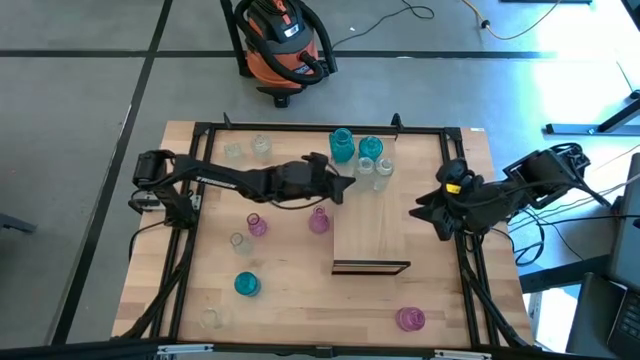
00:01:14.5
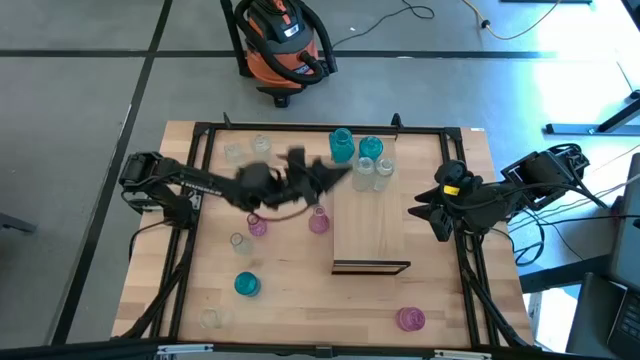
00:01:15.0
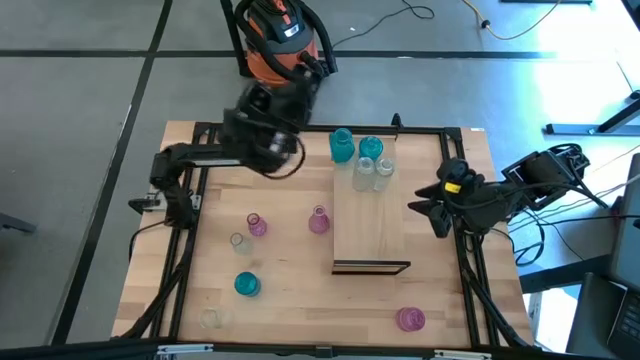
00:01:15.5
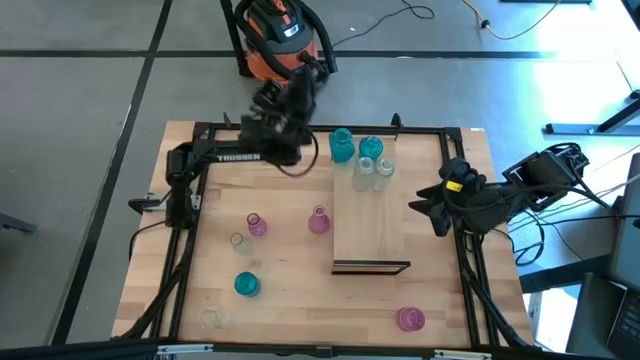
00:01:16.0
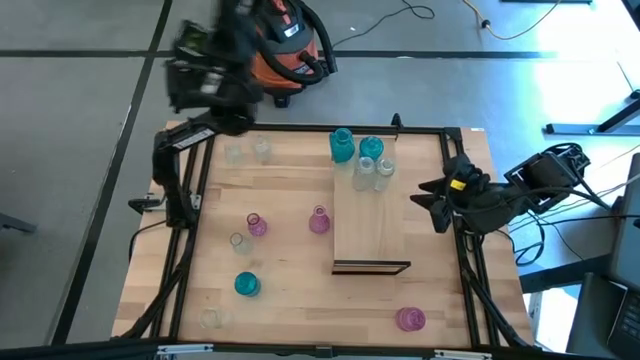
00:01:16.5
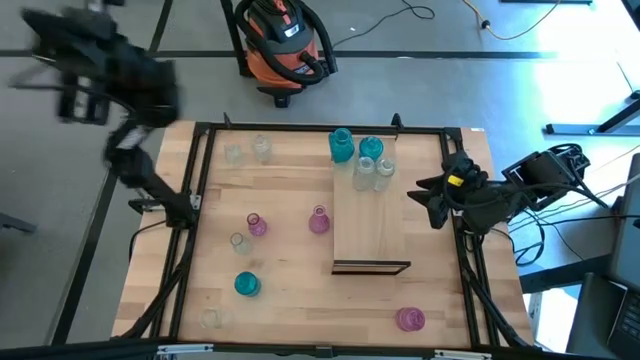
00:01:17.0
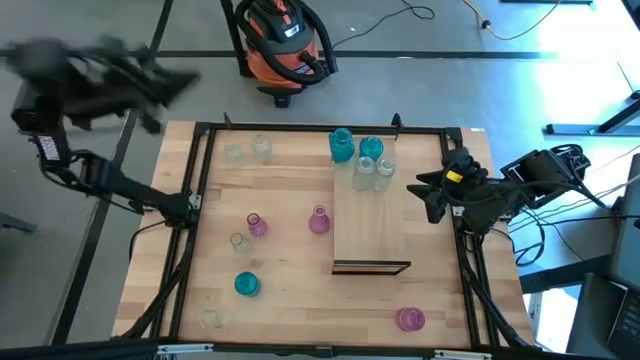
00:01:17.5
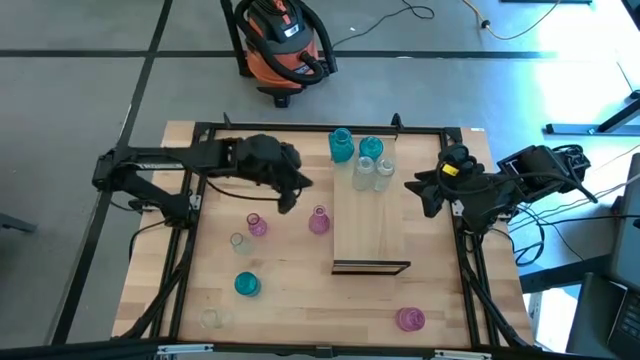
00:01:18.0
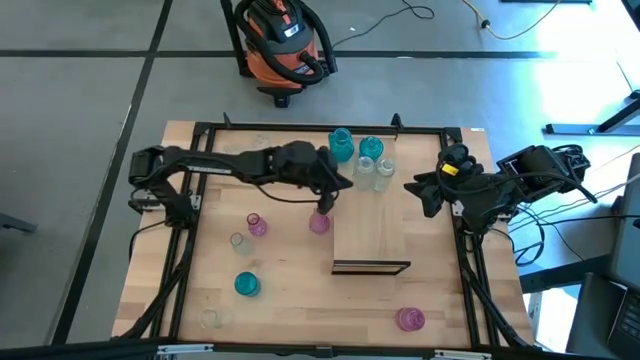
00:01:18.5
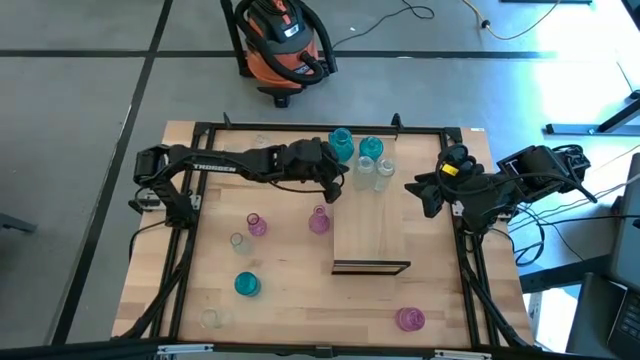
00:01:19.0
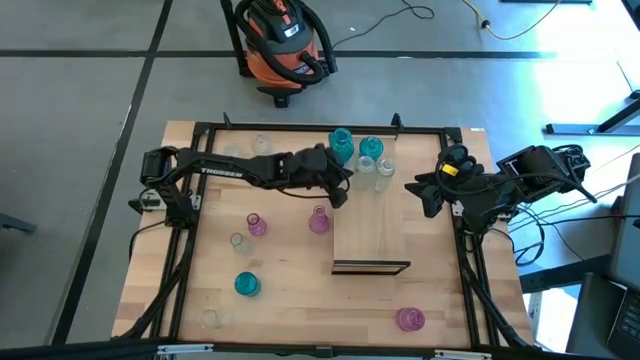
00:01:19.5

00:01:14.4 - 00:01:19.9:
Task: sort vases onto shelf
Adjust the transparent vase on the shelf

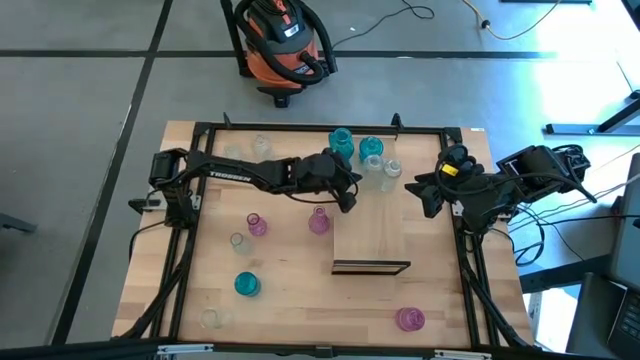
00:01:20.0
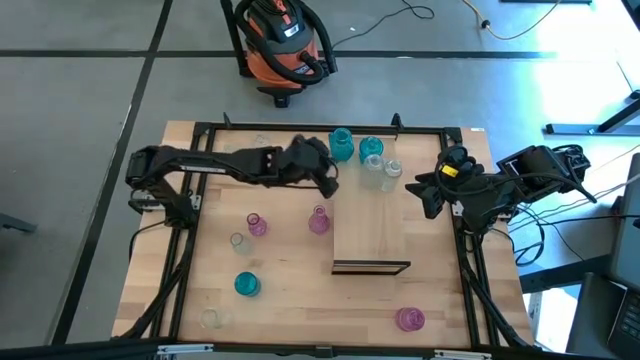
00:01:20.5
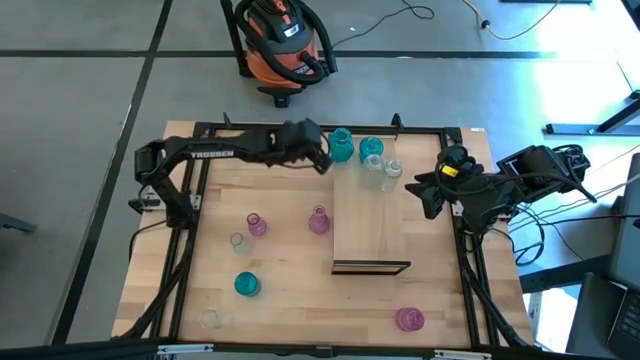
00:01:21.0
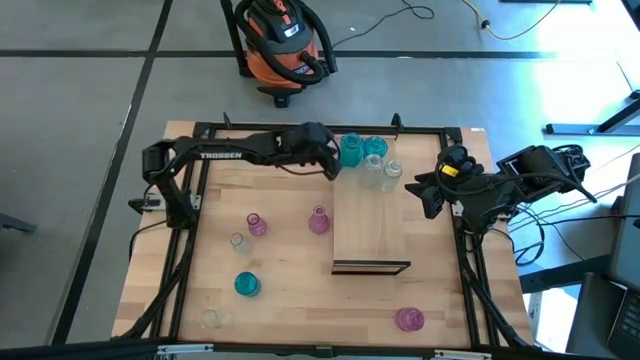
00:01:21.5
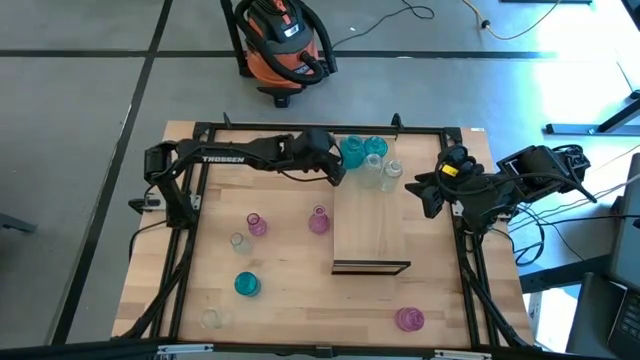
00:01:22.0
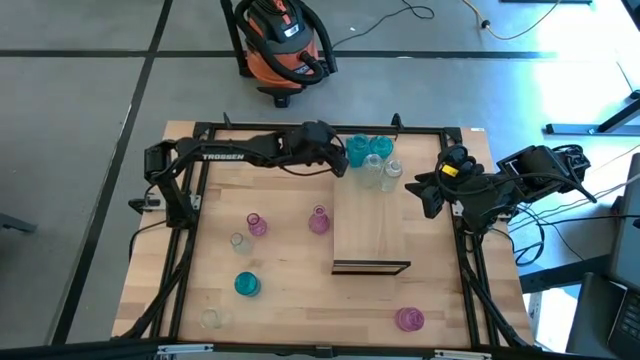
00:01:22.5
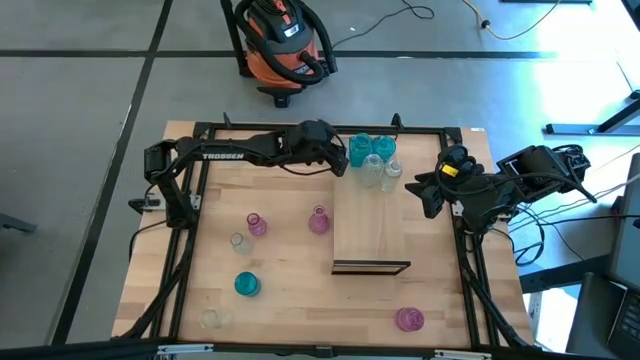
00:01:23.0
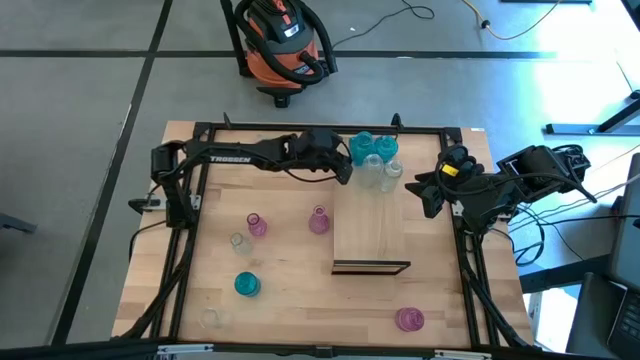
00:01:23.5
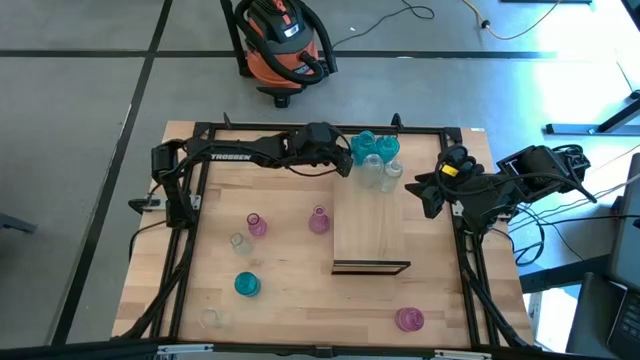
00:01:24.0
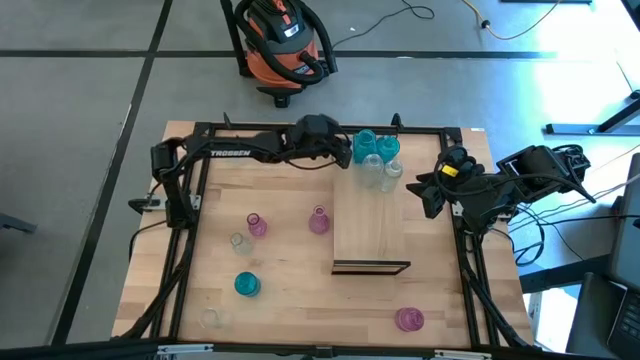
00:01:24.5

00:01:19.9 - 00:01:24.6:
Adjust the blue vase on the shelf

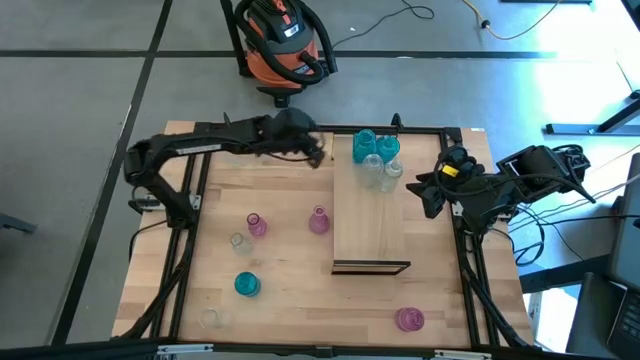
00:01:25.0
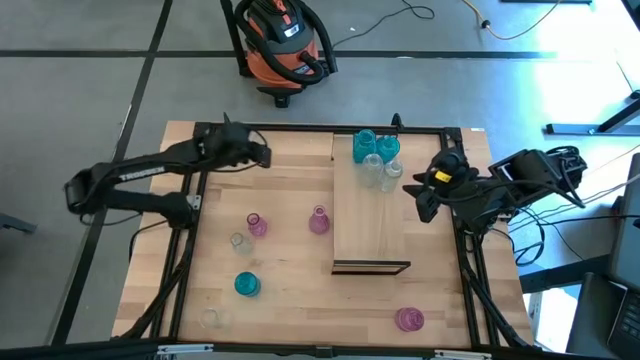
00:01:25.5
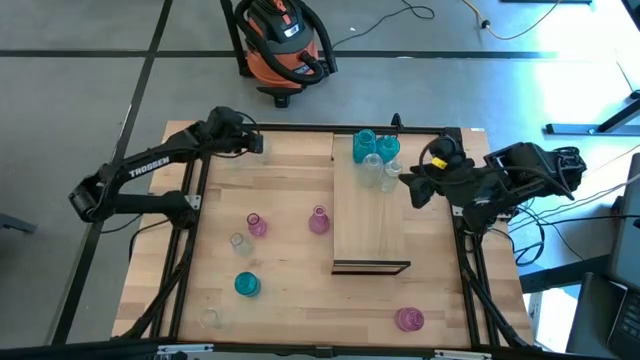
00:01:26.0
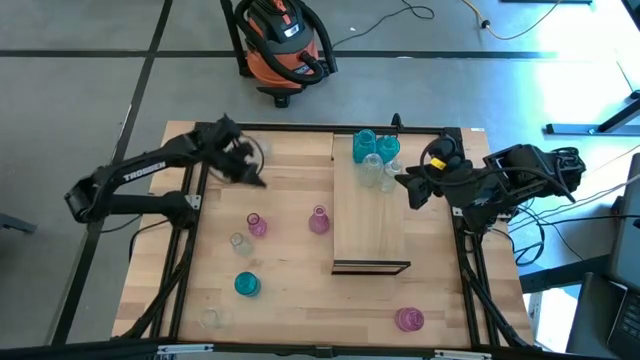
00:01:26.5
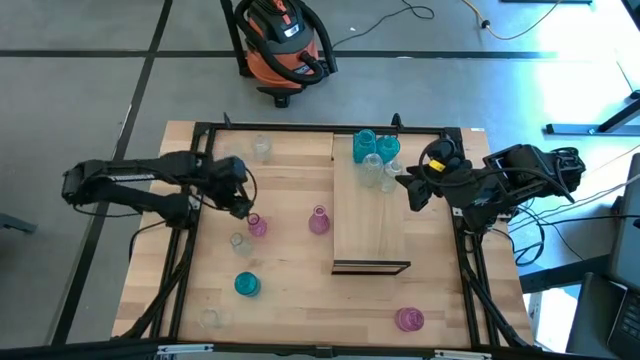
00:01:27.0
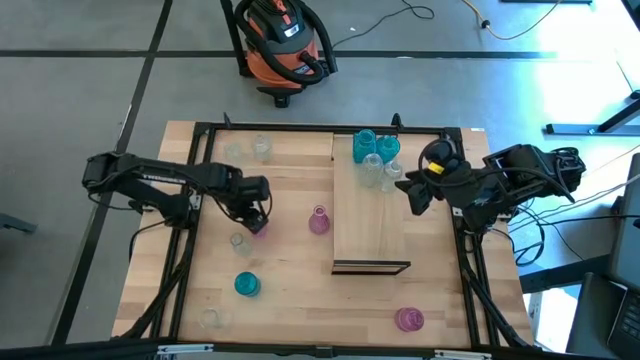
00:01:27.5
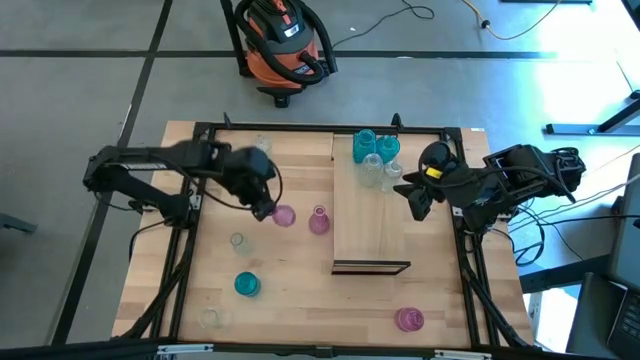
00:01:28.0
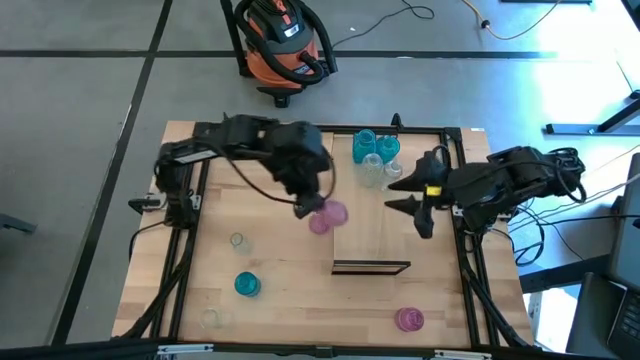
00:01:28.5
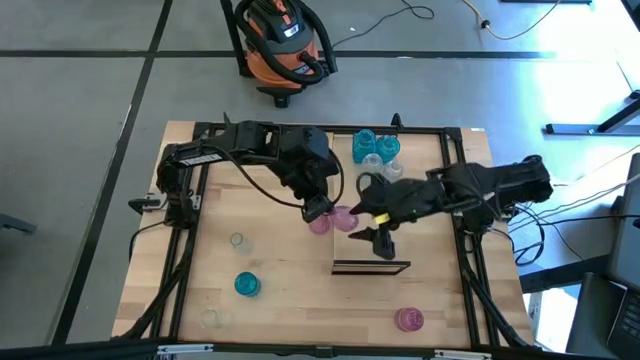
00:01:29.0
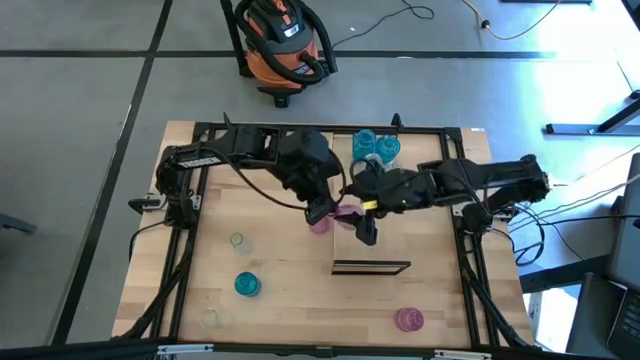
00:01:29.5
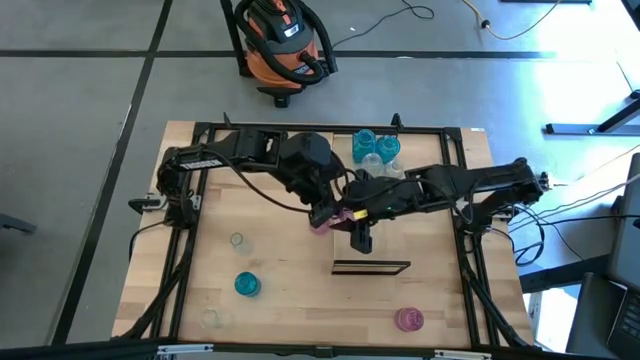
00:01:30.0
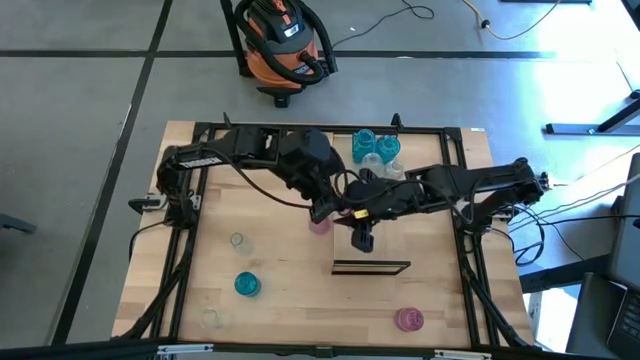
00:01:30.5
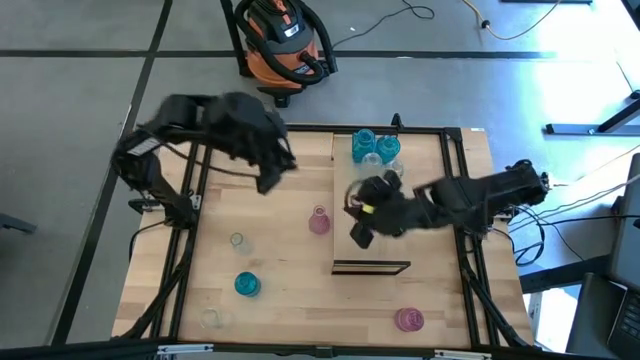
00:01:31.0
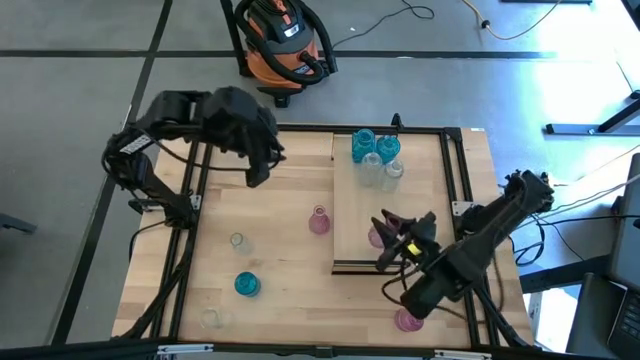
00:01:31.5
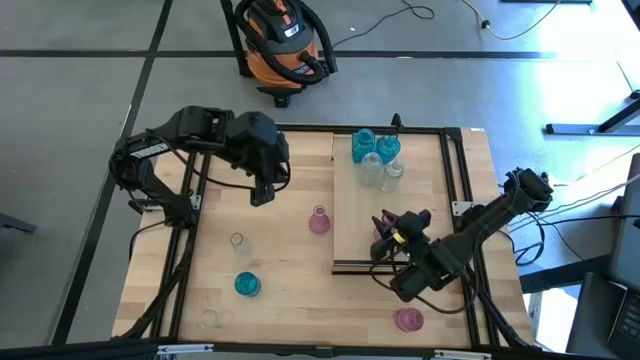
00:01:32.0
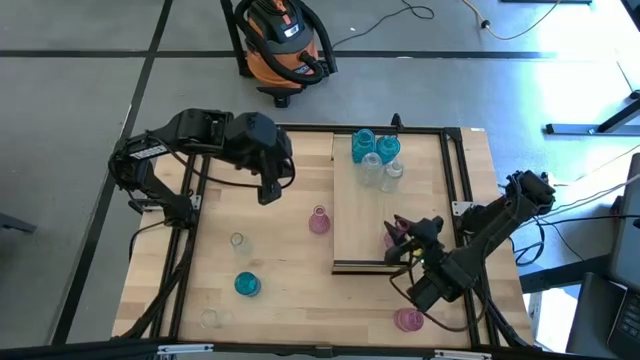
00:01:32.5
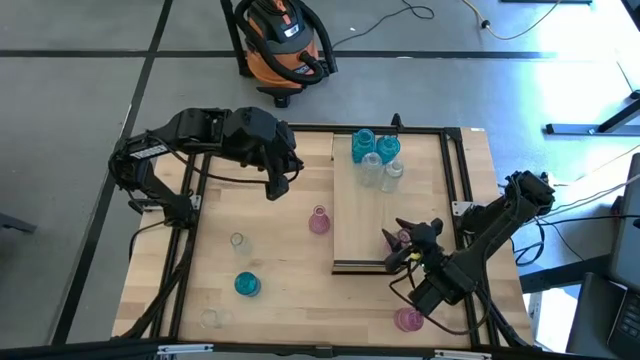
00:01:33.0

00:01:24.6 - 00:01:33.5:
Put the pink vase on the shelf

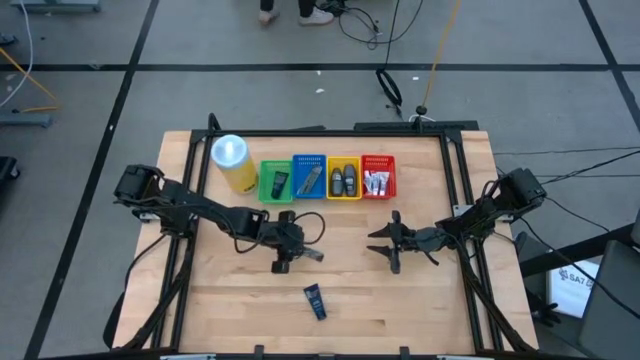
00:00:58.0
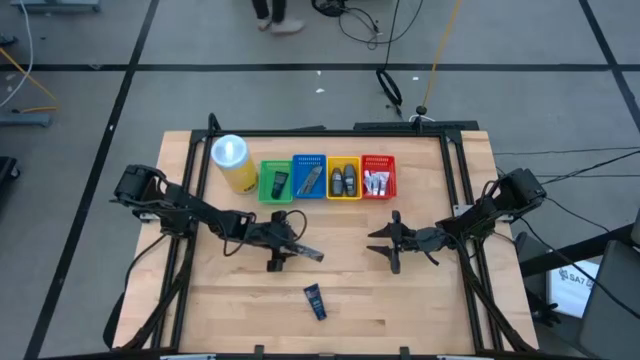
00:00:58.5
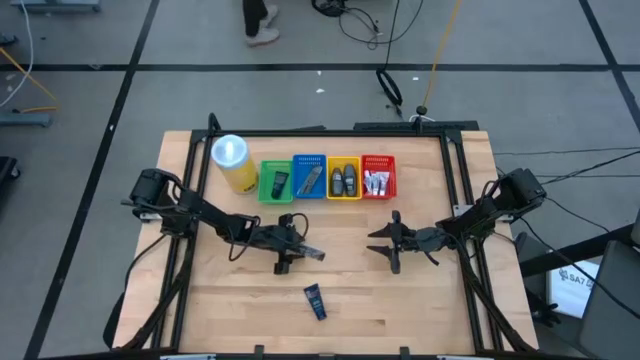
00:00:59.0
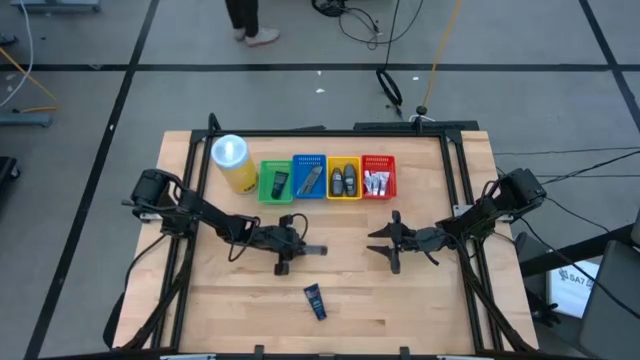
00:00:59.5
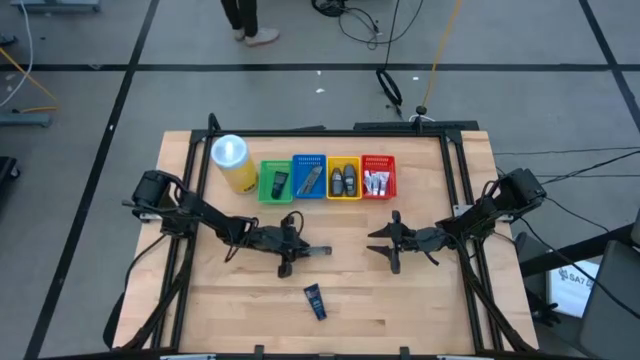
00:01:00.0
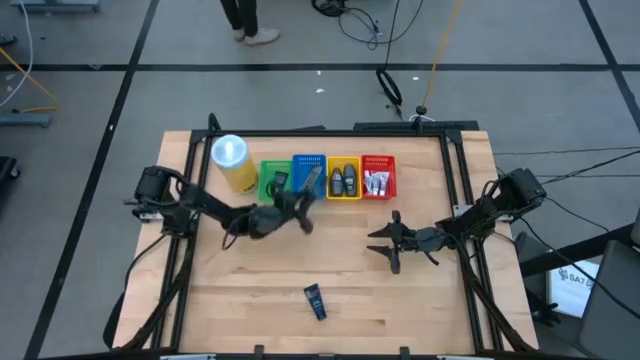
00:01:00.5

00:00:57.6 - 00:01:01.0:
Task: Pick & Place Travel size toiletries
Put the hair comb into the blue basket
